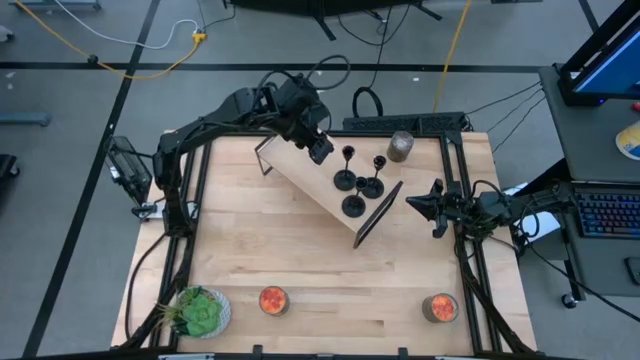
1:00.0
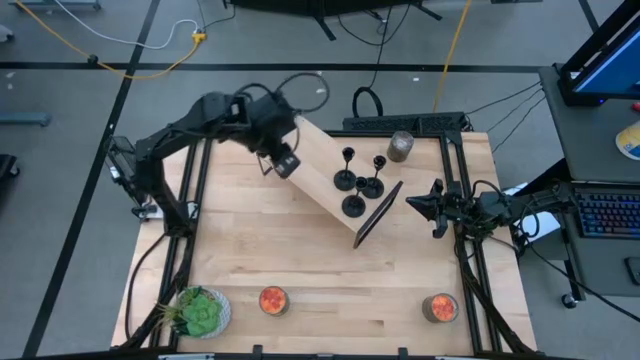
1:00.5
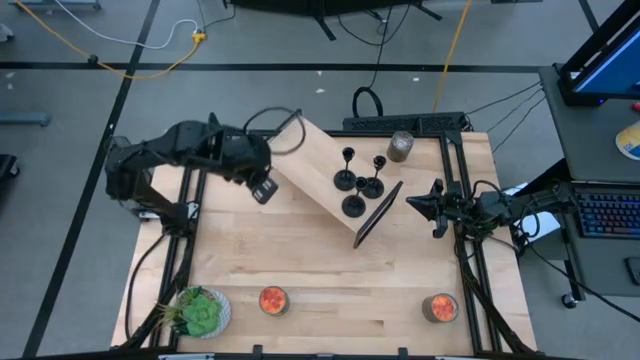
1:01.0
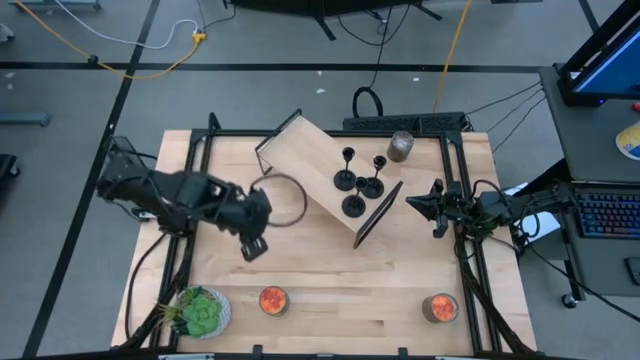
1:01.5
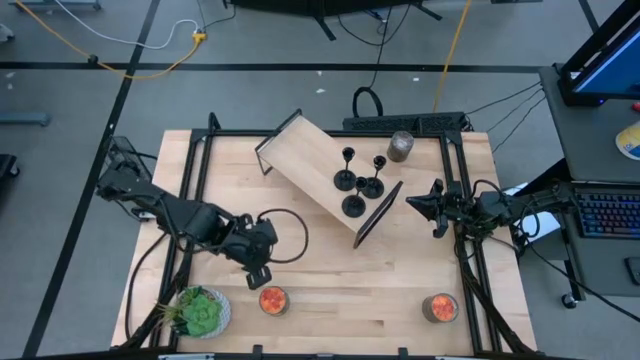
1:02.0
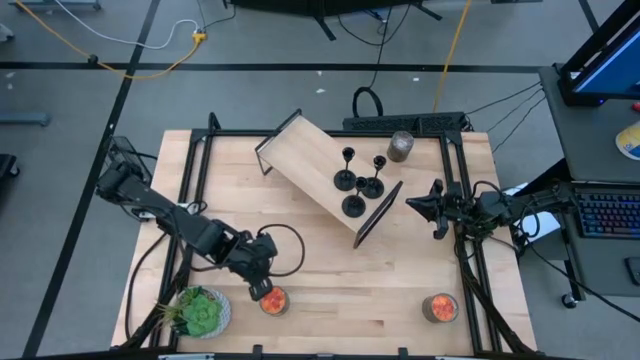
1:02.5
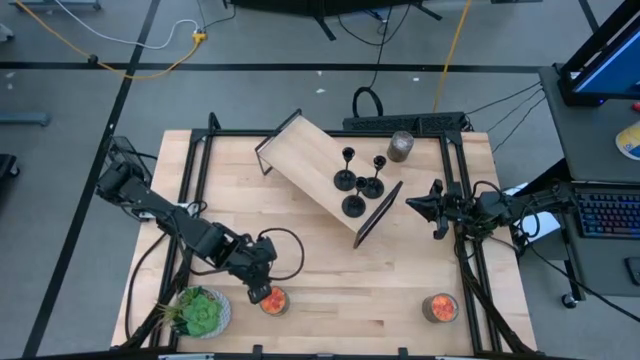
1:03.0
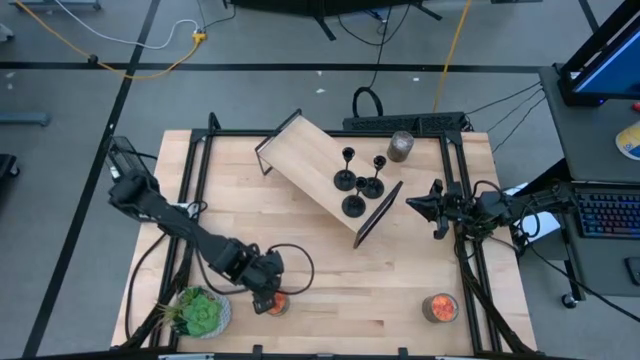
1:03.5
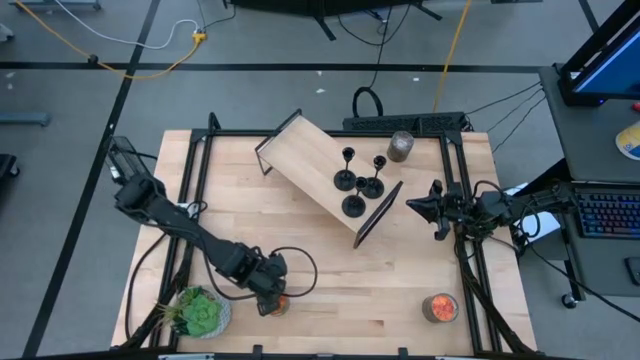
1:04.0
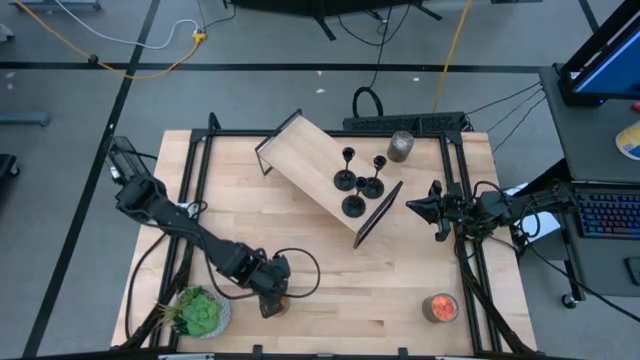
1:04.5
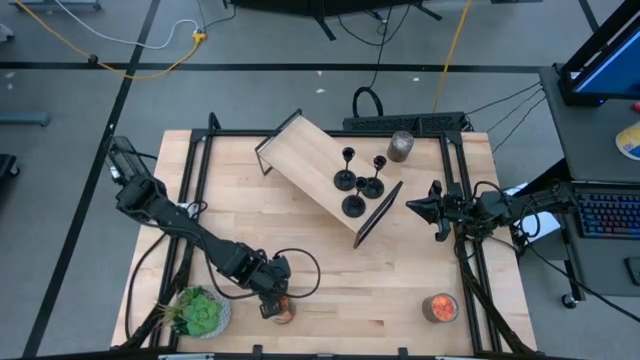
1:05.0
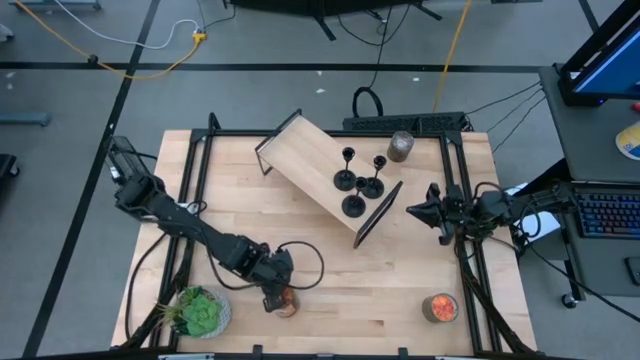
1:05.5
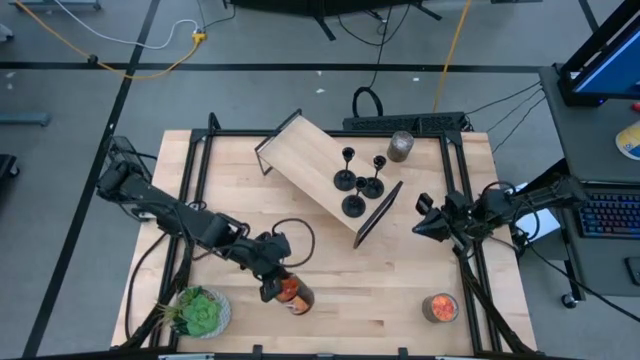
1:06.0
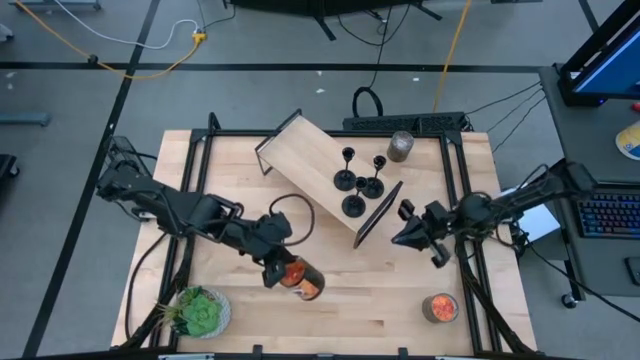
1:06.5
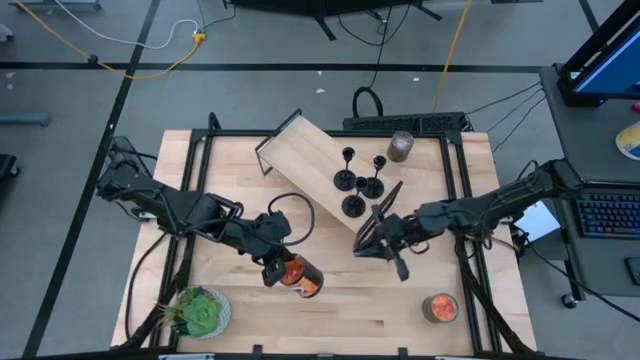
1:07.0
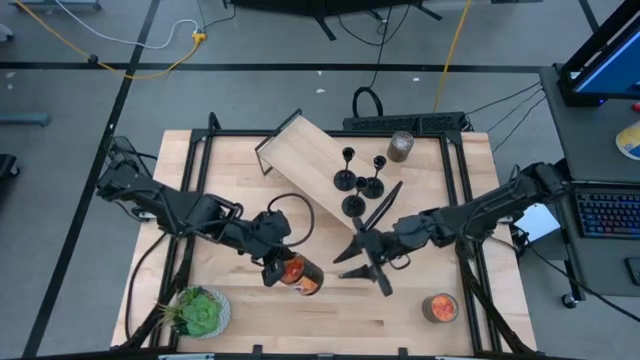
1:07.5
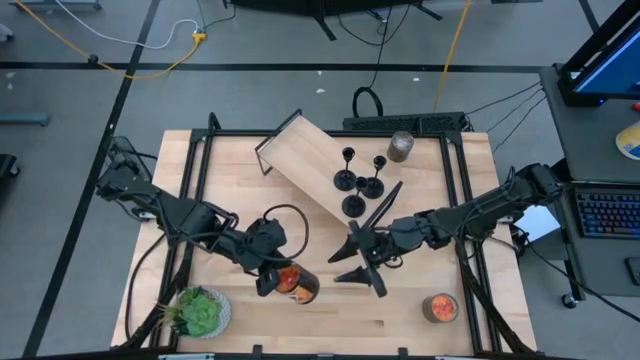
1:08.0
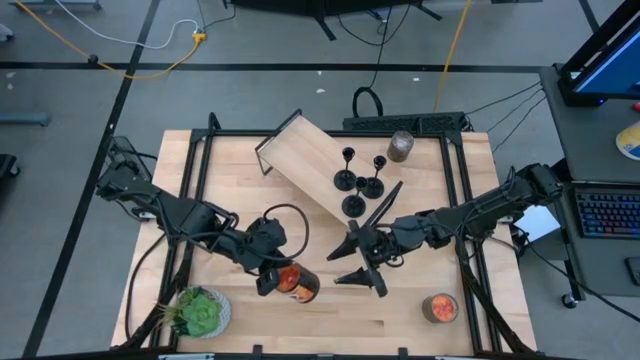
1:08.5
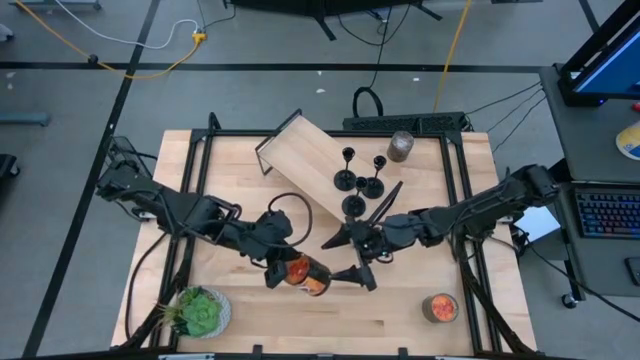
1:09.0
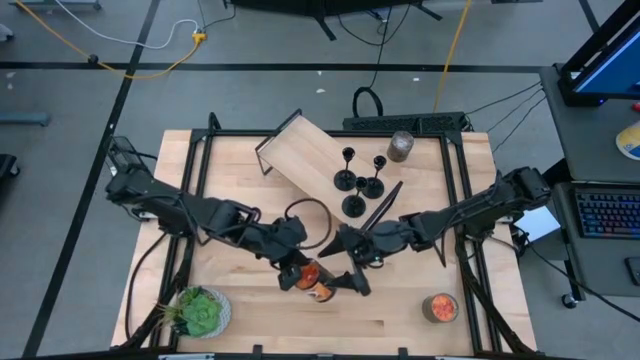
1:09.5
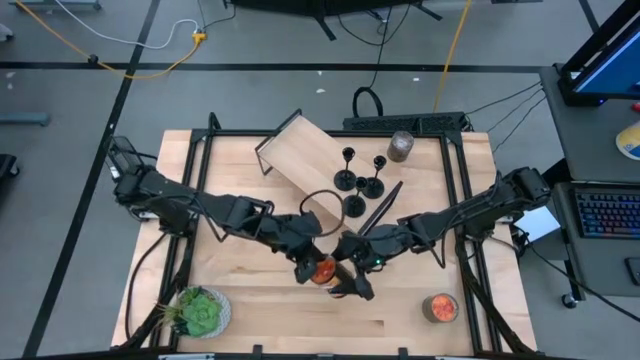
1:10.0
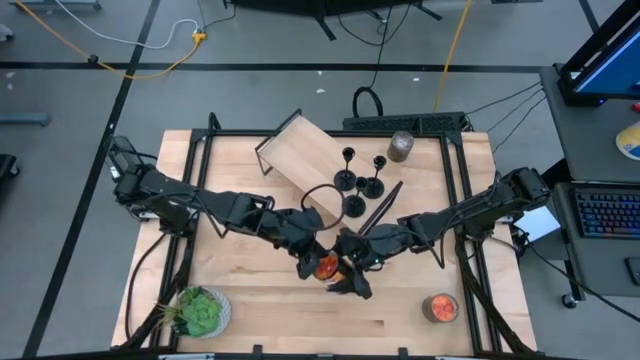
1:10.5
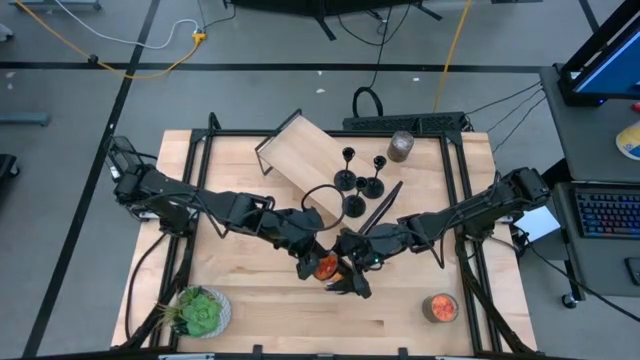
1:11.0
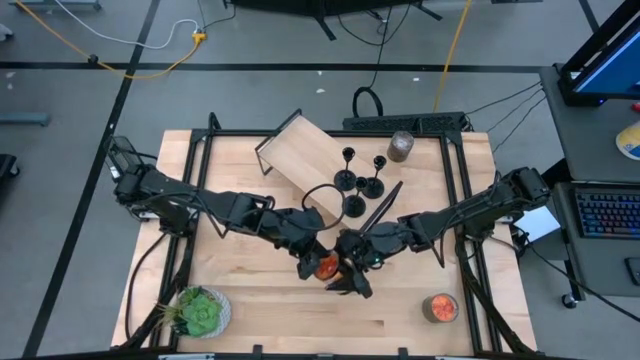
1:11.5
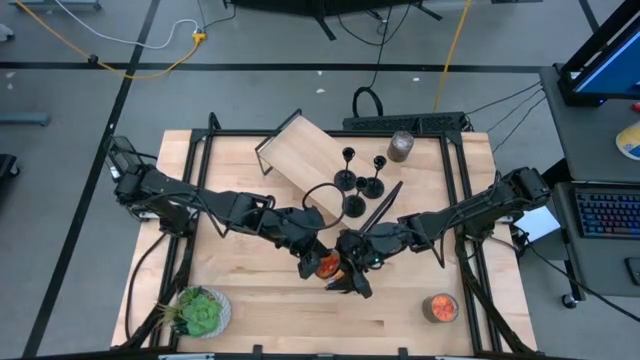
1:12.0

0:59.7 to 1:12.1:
Task: Pick & Place candle stick holders
Put the left orange scented candle on the shelf

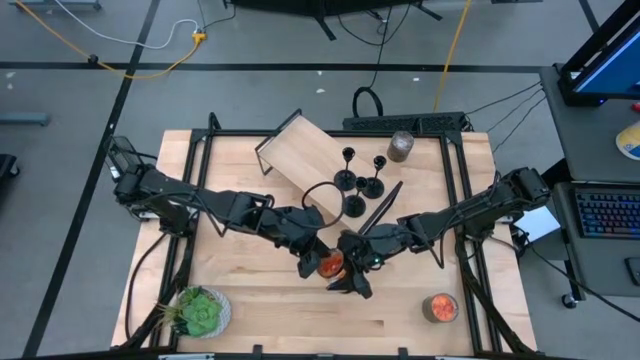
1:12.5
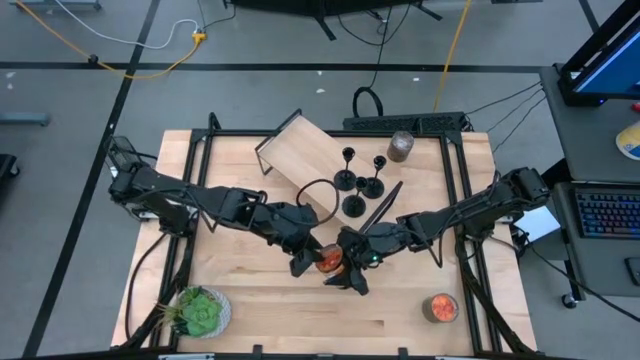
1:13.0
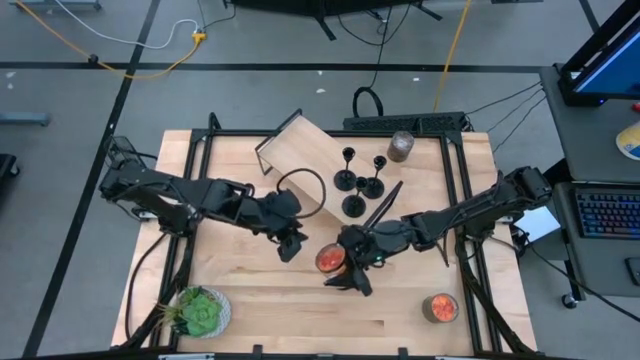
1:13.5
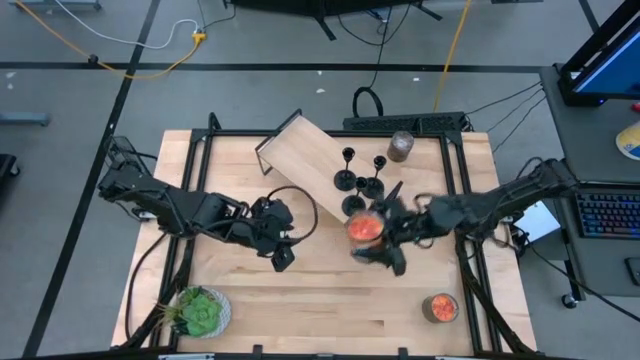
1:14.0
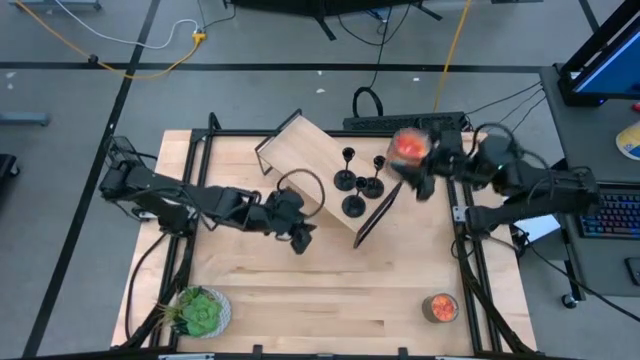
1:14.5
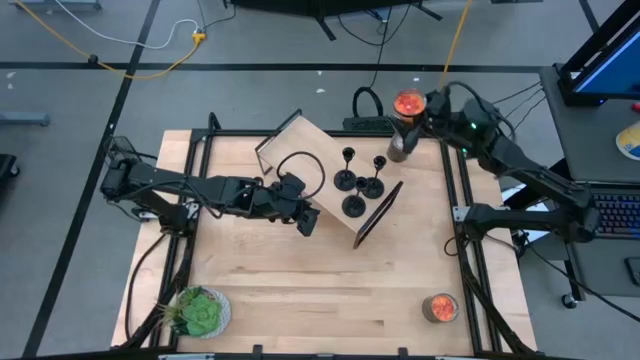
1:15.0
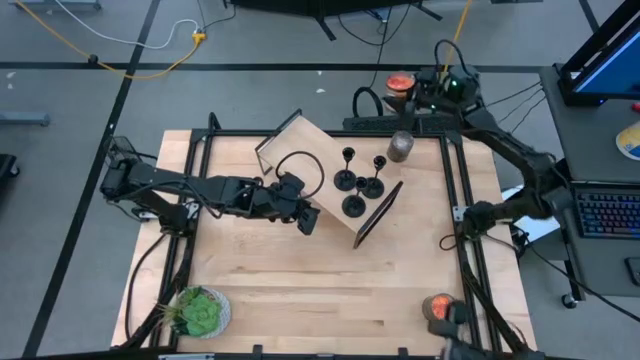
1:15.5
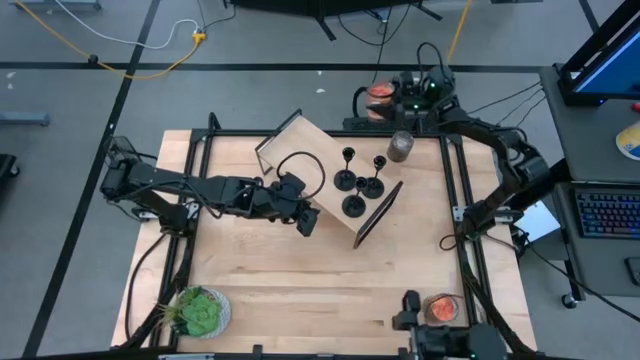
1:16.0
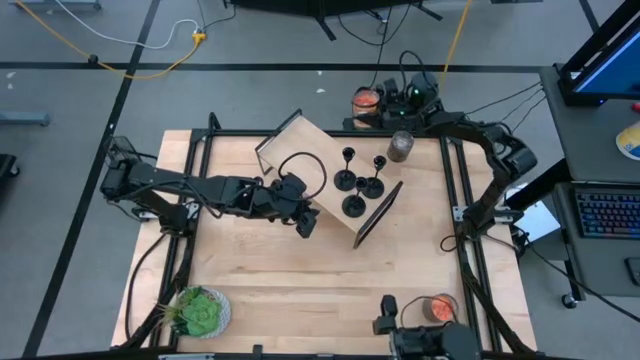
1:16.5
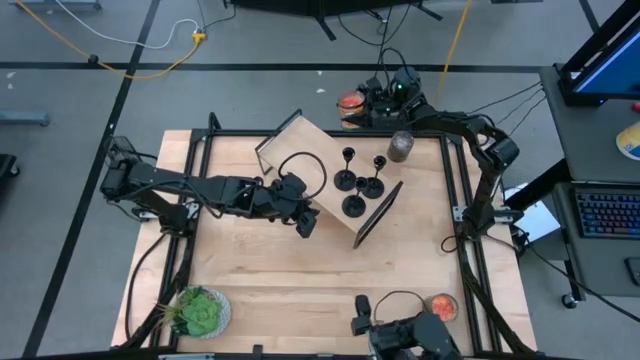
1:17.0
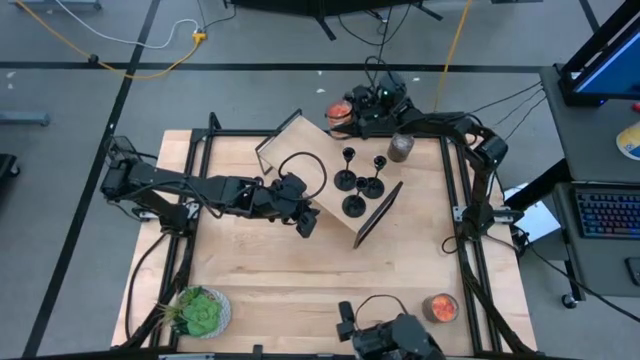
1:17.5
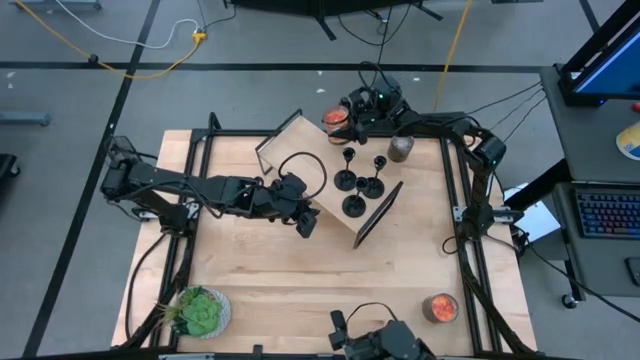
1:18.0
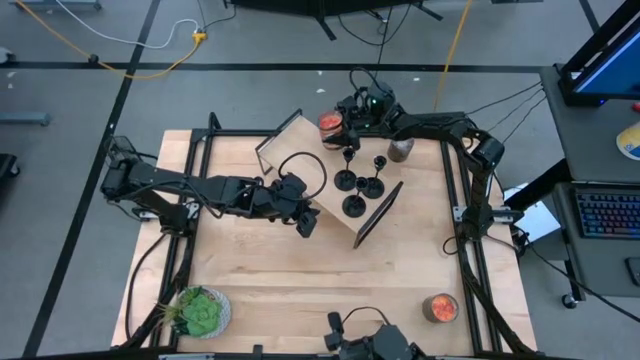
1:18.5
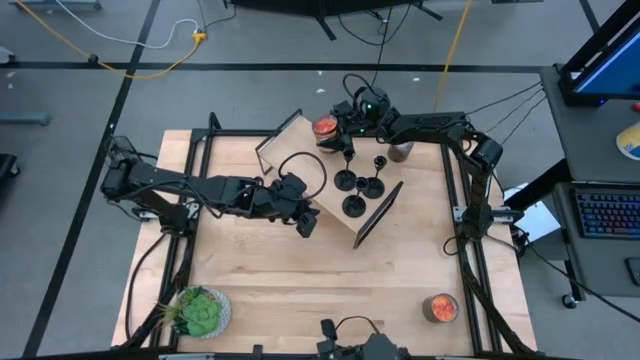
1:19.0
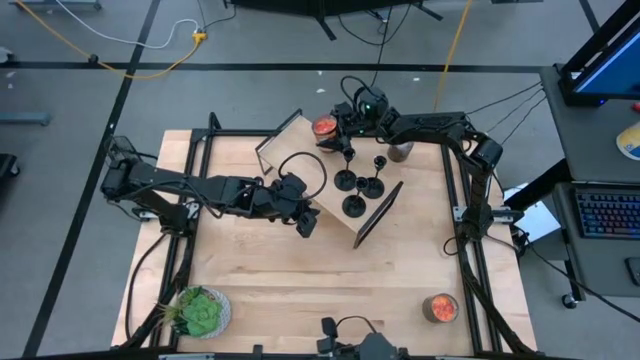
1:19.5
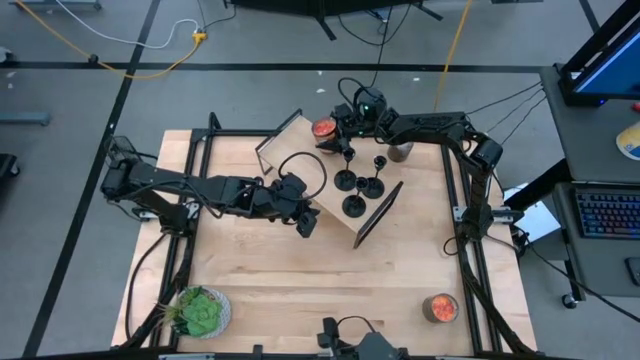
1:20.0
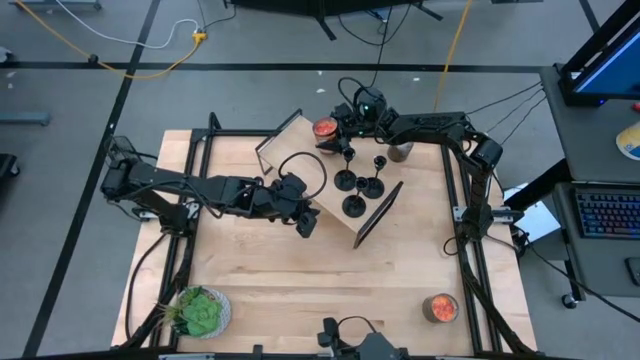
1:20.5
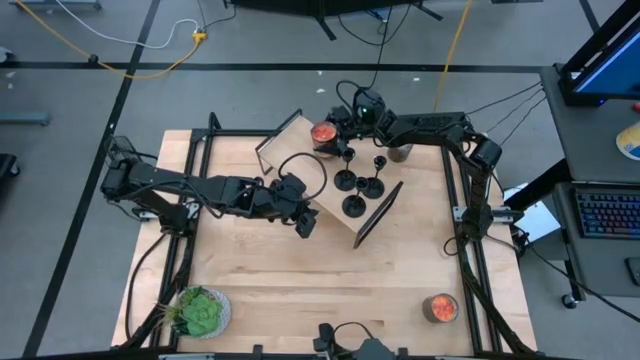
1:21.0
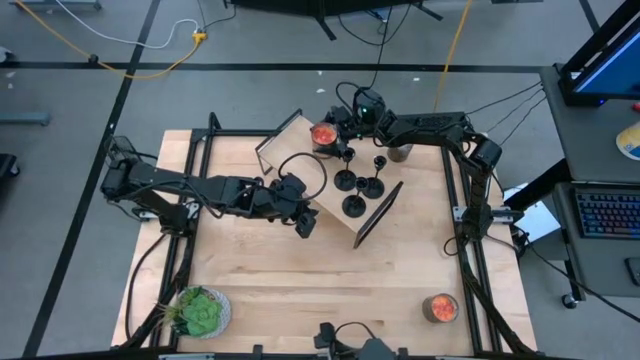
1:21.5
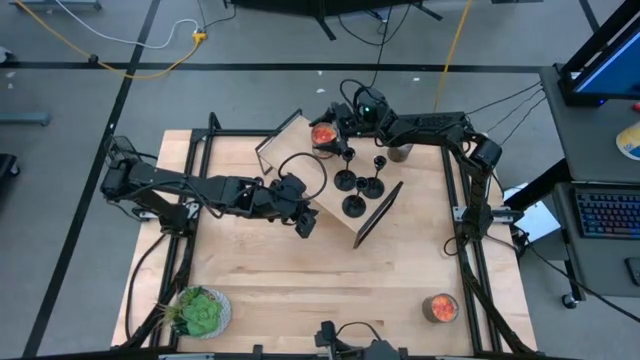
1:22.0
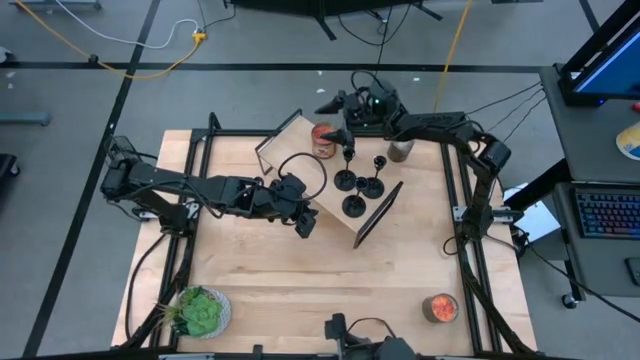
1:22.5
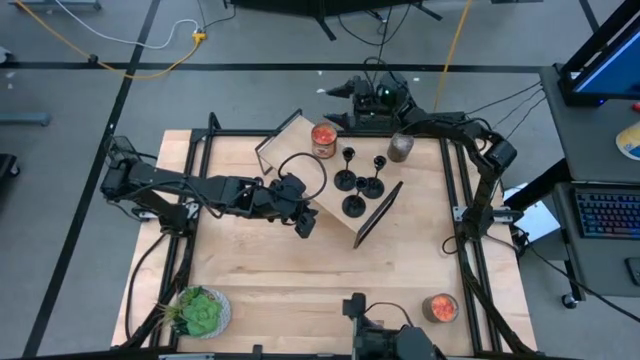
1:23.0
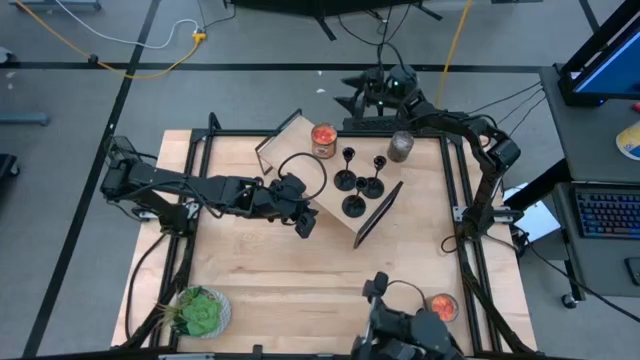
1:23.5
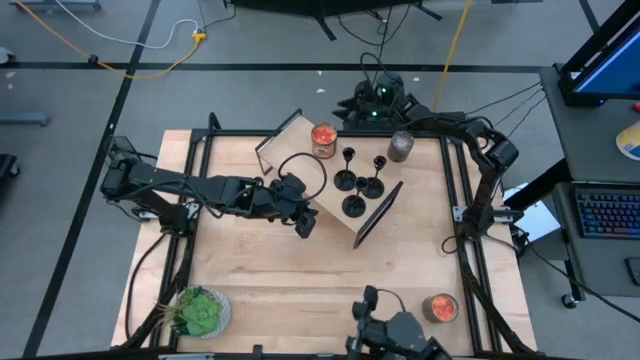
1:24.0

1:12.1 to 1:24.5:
Put the left orange scented candle on the shelf
